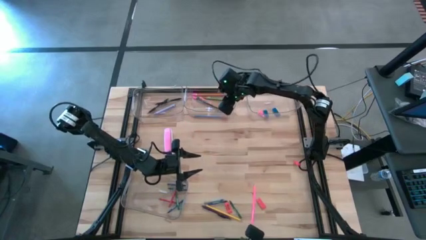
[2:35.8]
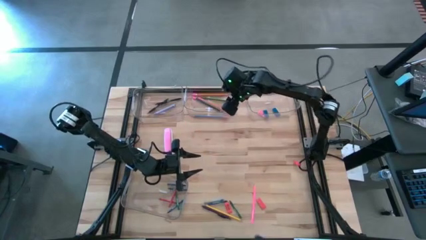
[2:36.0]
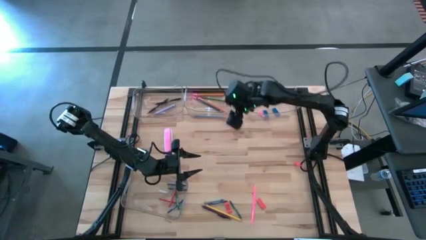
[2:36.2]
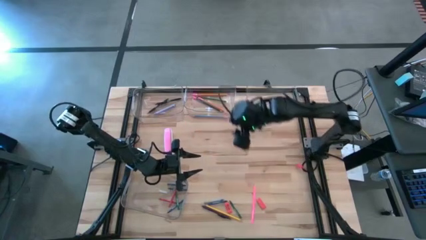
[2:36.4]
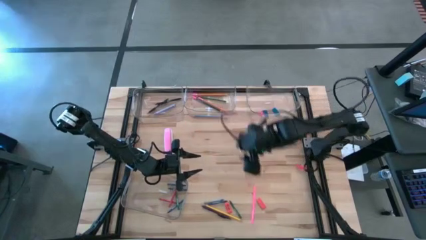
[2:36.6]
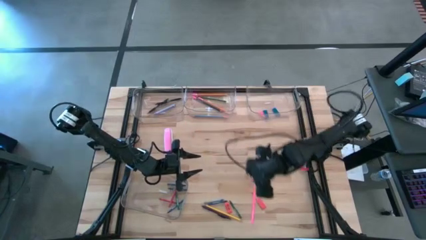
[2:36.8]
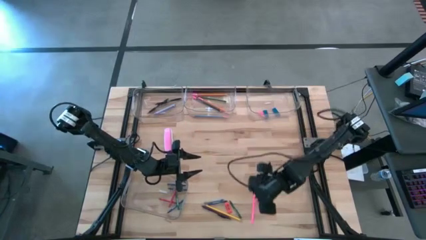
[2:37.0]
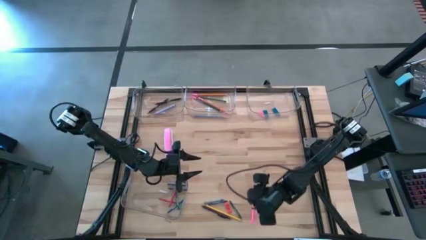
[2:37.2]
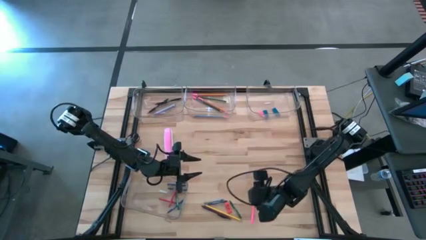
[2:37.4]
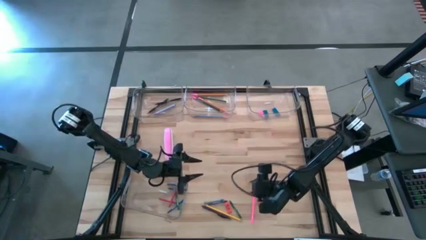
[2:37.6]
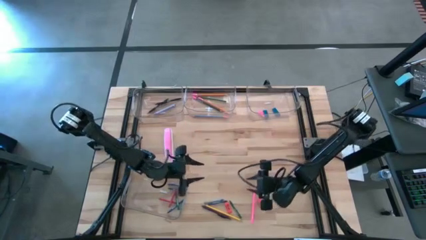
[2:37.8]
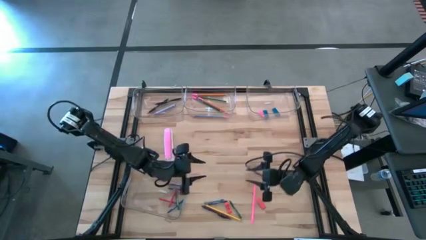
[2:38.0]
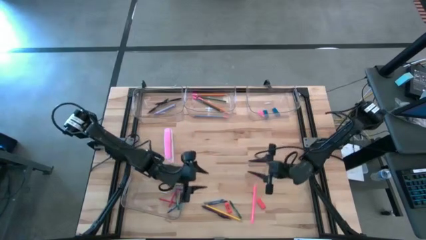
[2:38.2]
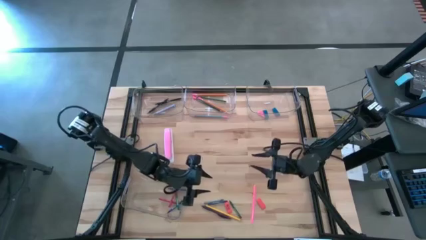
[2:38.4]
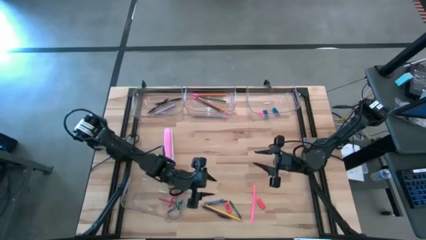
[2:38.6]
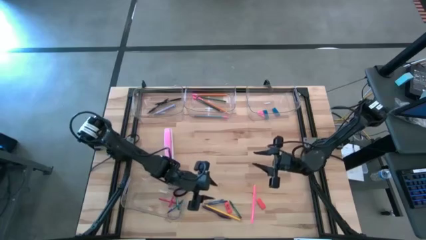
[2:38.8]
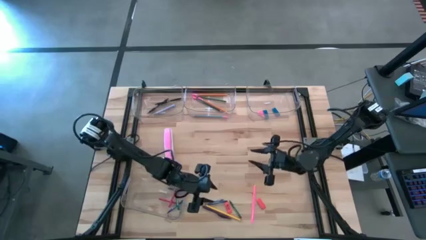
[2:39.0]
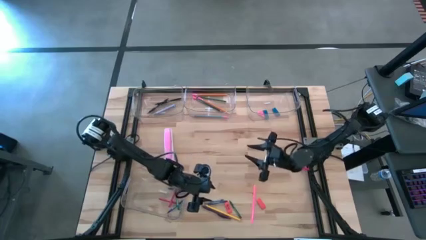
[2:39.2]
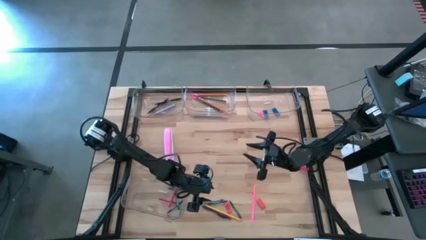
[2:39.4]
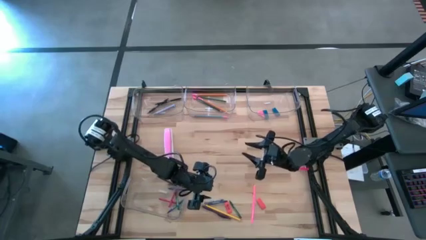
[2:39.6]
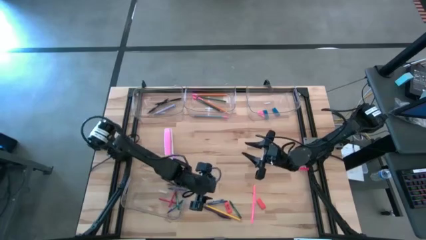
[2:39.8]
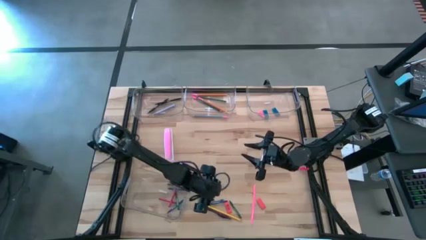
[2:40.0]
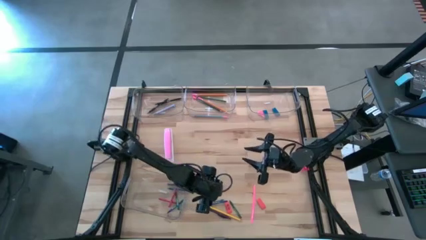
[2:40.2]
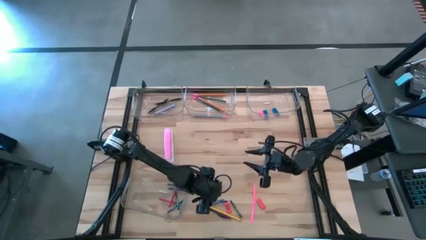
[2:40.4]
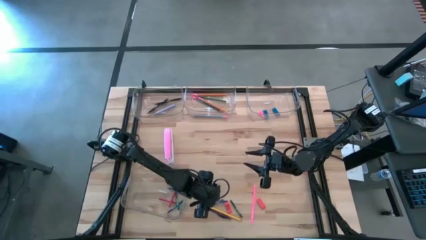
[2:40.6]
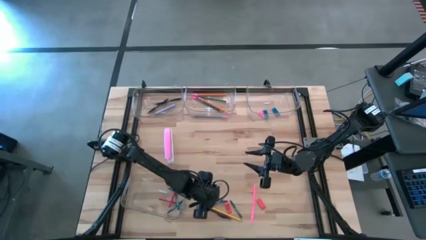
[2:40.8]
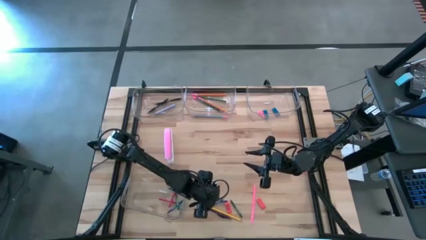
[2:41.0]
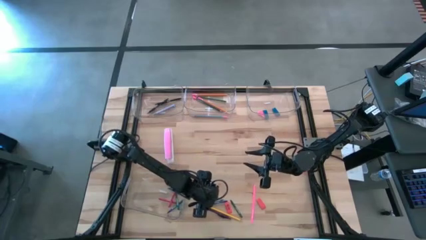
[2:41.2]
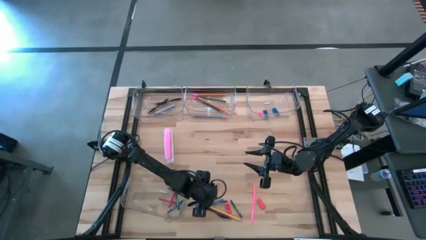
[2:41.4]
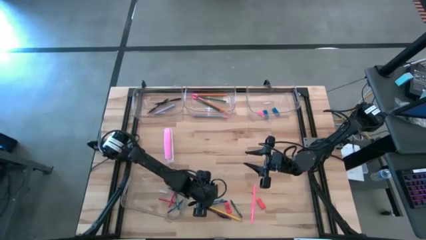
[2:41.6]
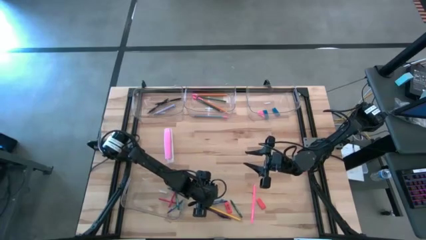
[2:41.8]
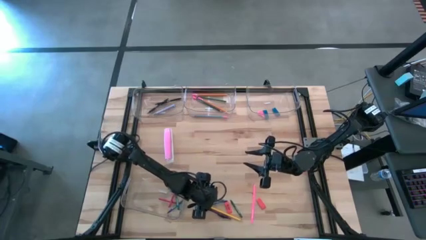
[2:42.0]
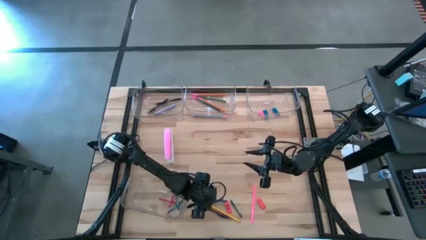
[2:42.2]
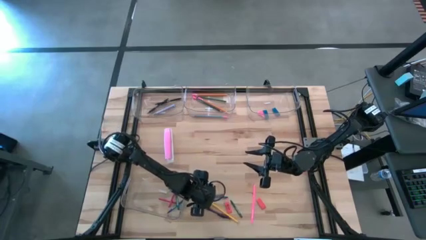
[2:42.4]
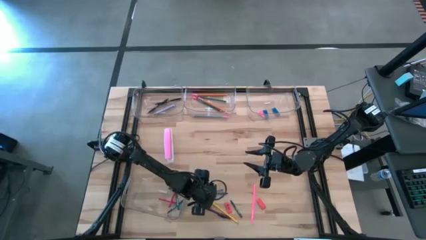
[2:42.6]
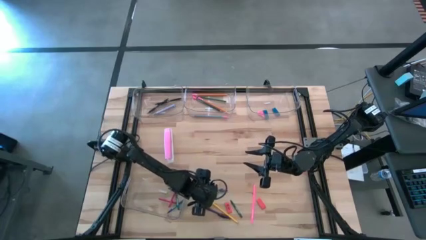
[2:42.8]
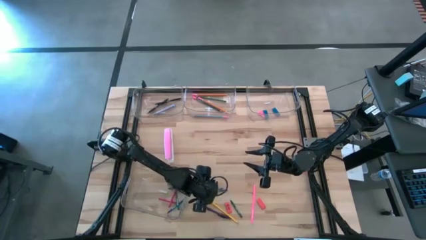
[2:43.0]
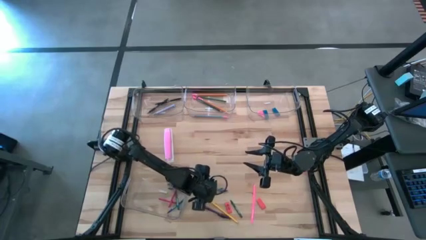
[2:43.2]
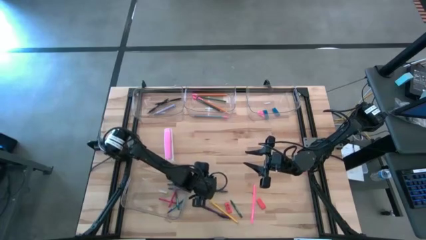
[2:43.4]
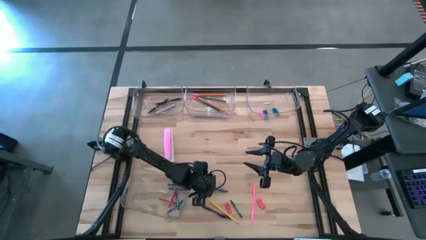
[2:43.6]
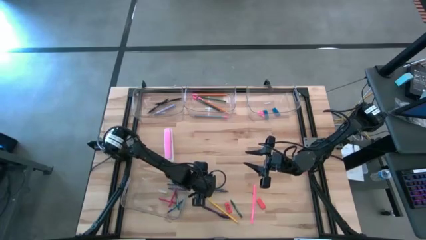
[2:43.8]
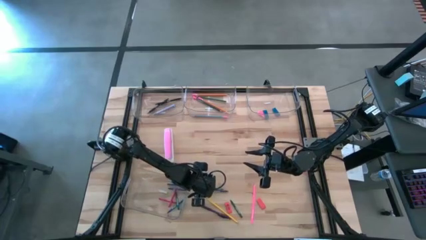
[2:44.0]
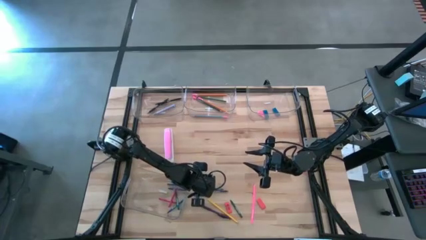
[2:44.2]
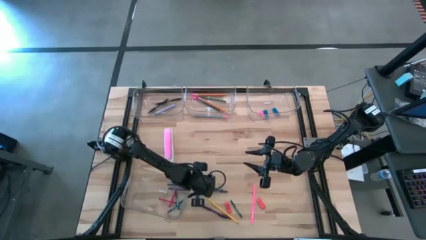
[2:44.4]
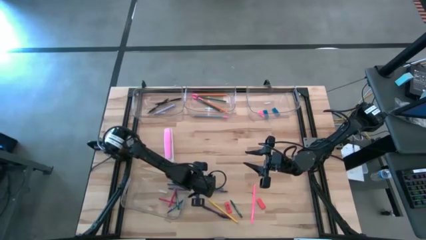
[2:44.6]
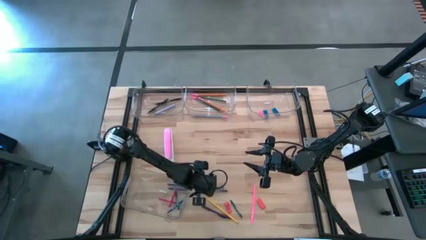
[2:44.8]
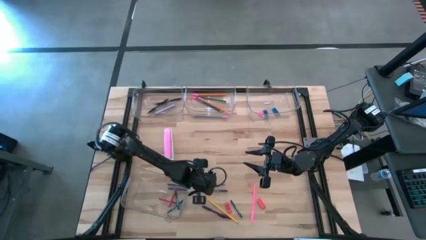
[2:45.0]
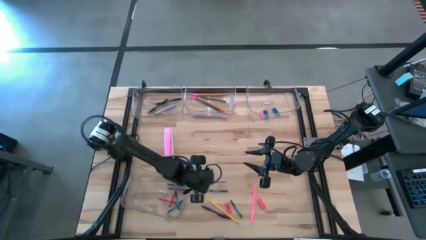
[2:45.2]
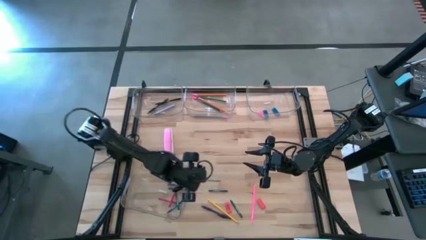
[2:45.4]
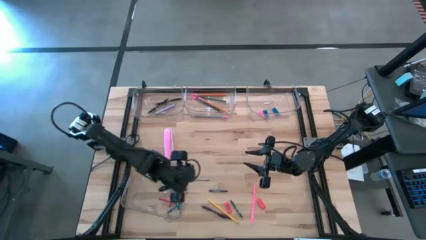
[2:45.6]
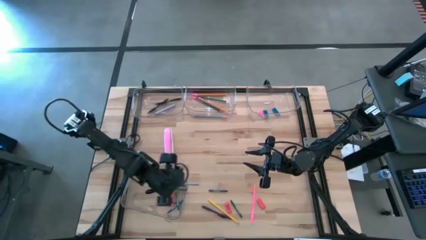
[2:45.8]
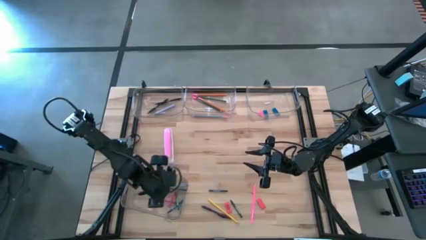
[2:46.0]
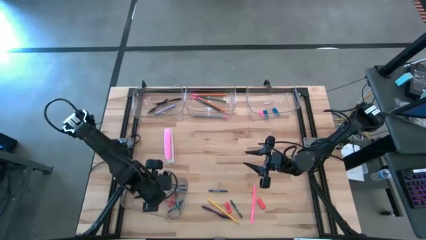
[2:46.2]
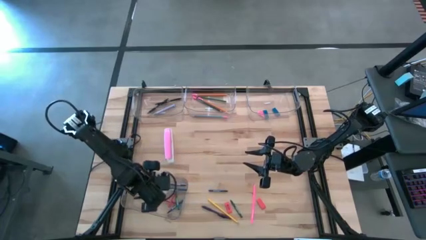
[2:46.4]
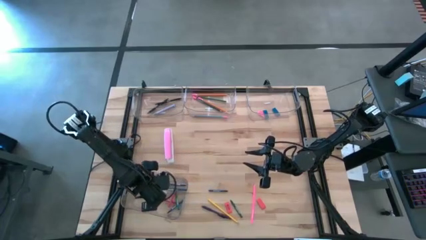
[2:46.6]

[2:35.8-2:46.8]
Task: Sort crayons/erasers/pens/pencils in bins
Put the gray crayon into the bottom left transparent bin

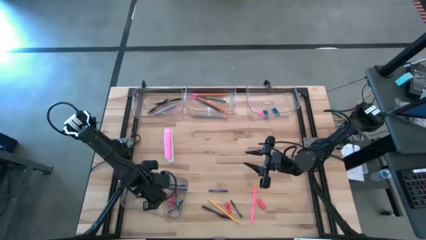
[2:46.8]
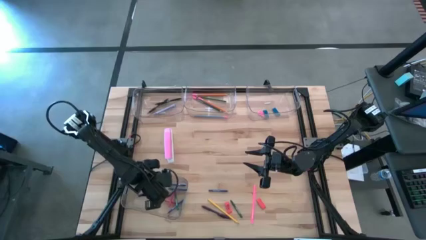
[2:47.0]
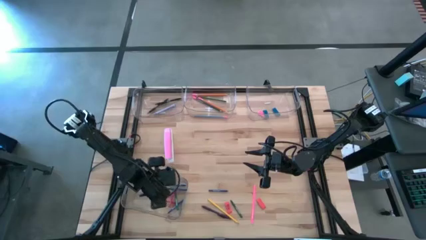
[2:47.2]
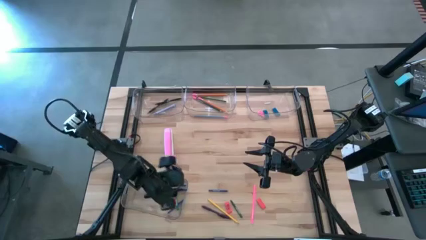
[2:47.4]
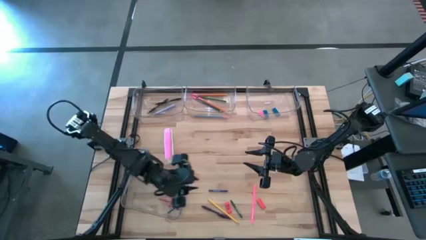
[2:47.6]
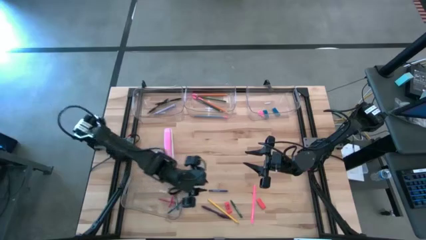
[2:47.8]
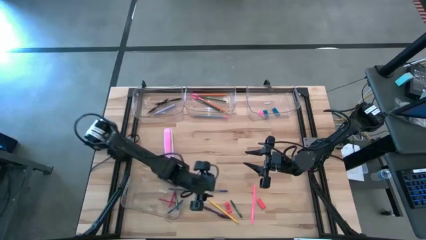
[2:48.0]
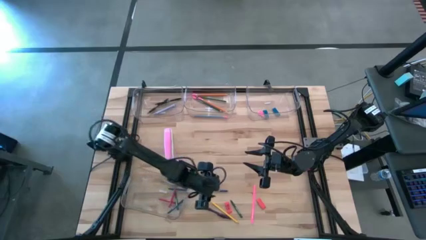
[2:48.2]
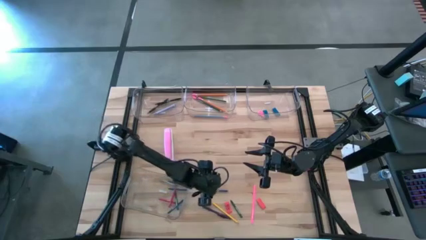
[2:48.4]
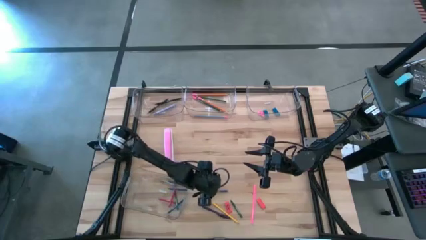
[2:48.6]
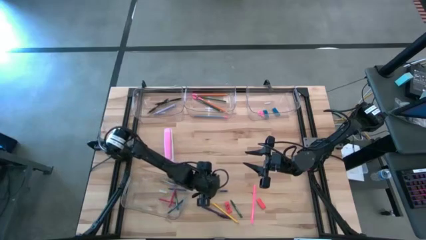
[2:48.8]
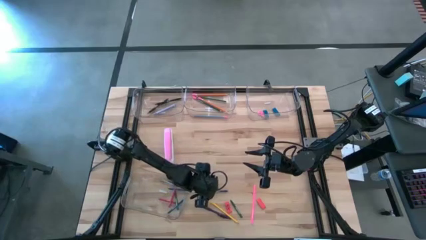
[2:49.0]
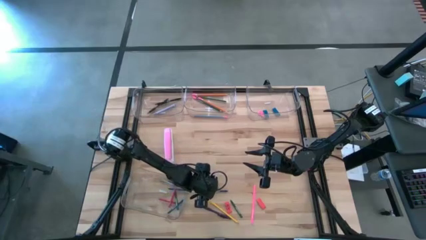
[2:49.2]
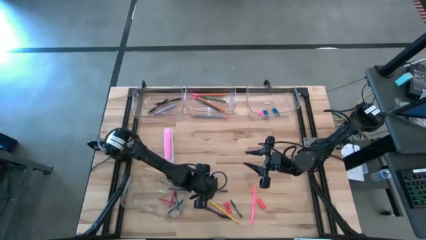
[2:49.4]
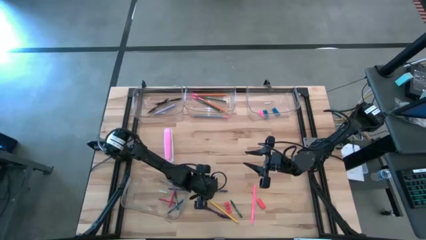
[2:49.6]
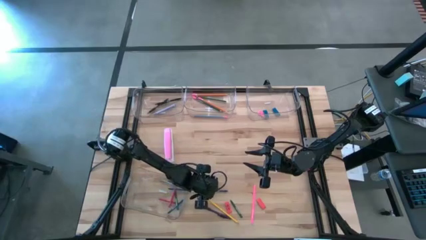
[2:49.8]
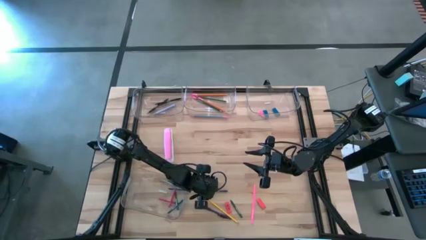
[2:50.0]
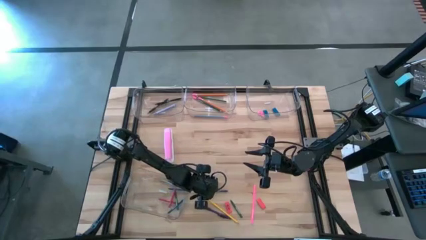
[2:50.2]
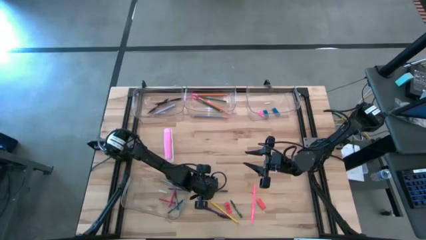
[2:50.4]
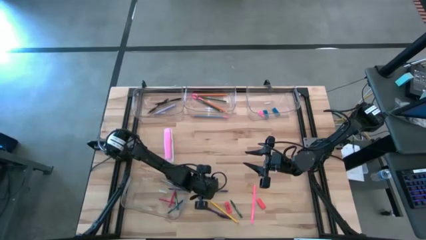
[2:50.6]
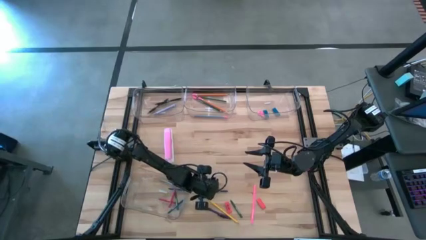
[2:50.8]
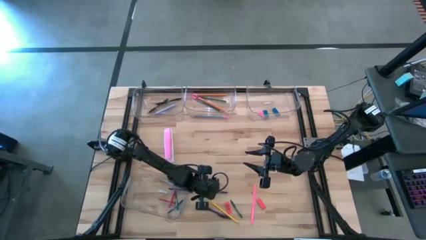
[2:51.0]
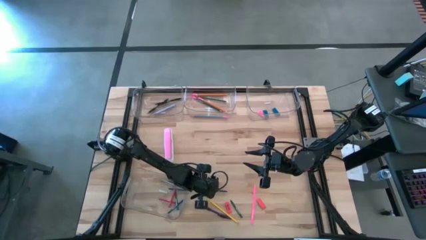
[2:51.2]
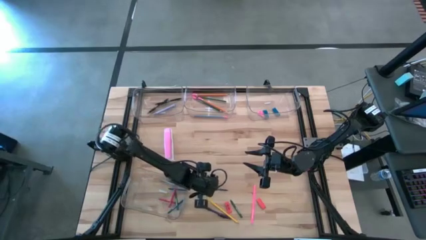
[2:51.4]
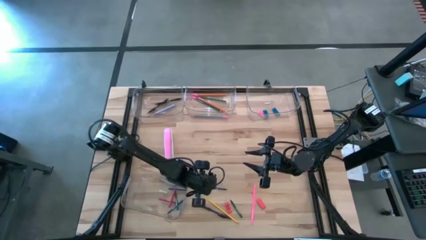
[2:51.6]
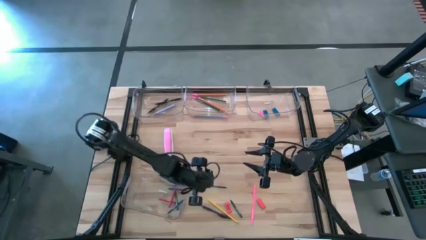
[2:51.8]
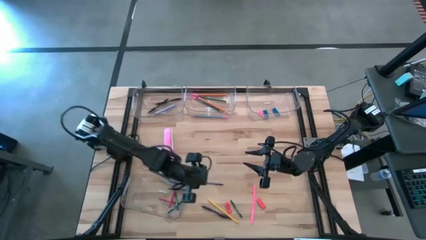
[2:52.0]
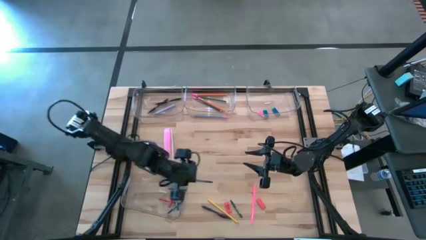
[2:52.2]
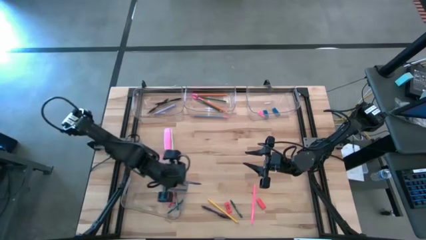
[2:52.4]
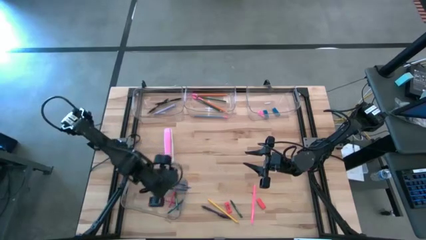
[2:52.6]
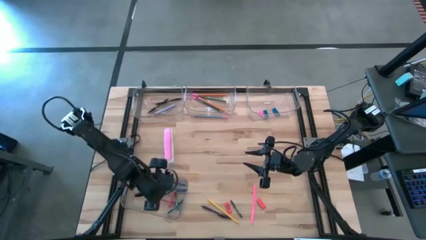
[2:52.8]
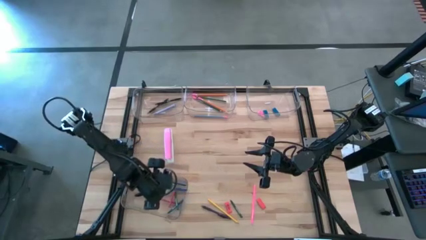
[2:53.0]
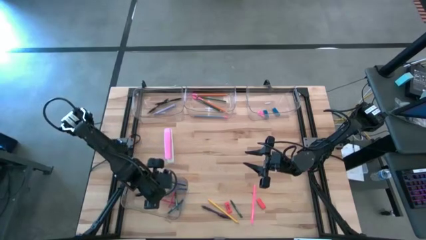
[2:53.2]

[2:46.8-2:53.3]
Put the blue crayon into the bottom left transparent bin
